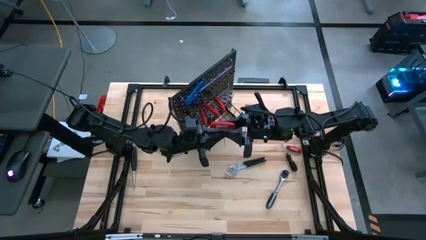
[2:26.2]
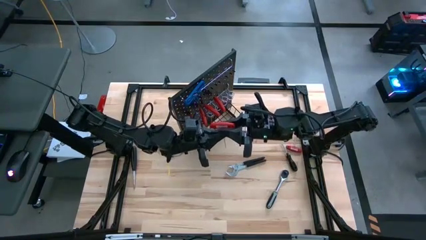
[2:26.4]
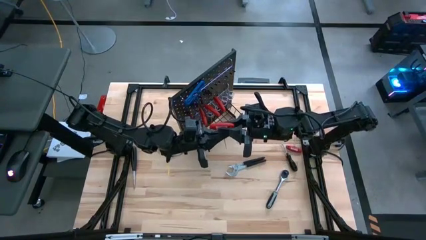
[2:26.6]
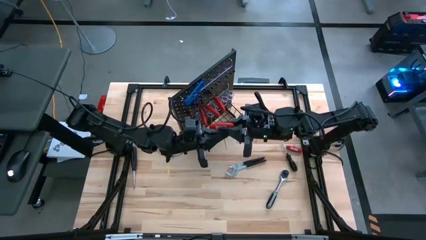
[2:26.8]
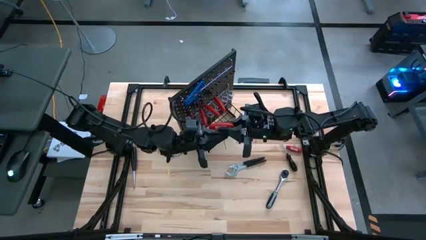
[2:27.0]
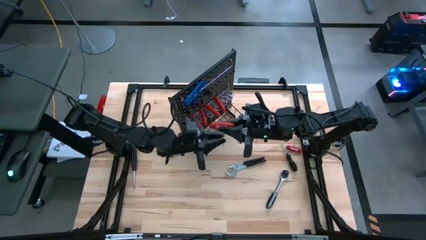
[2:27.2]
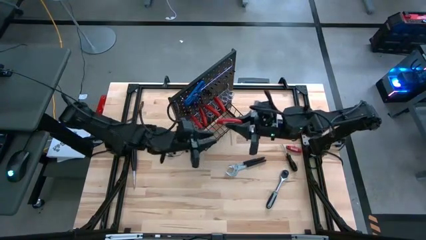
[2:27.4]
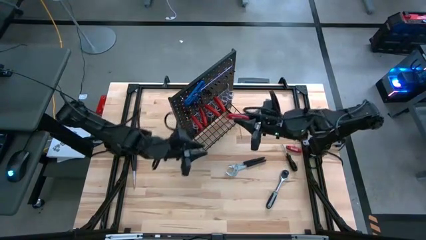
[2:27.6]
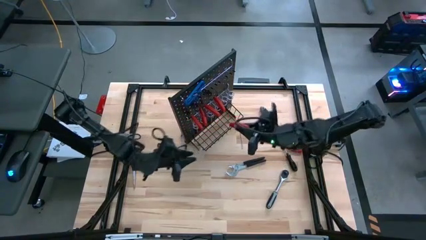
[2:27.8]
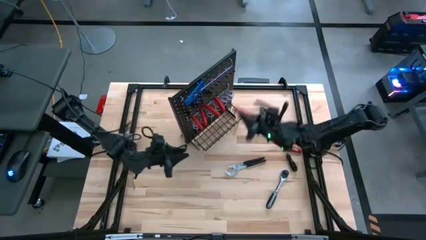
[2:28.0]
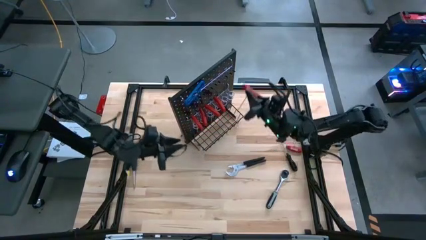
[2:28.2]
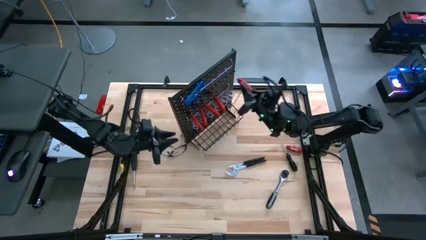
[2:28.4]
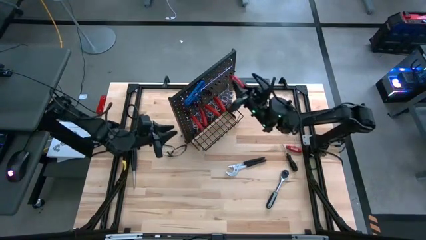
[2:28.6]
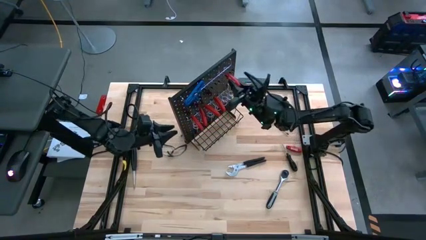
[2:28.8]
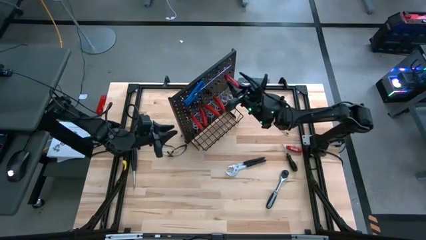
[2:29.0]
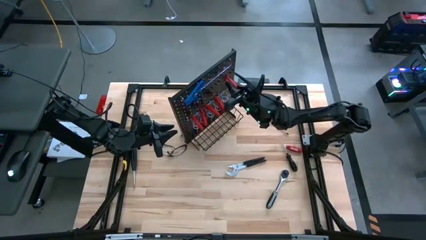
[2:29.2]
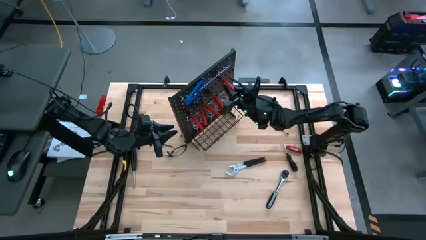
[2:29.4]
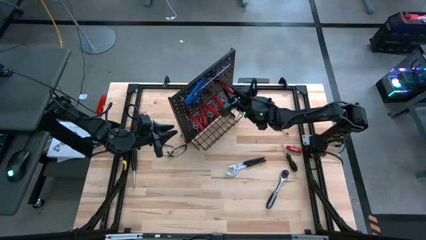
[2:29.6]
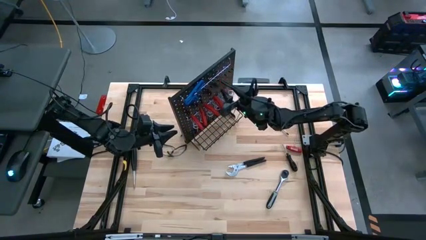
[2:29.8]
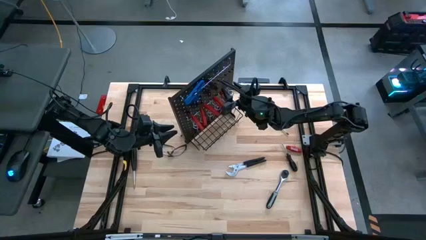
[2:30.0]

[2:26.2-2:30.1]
Task: Hang tools onto peg board
Hang the left red allen wrench on the pegboard

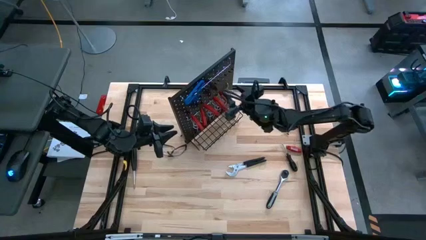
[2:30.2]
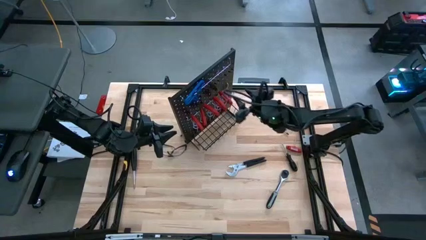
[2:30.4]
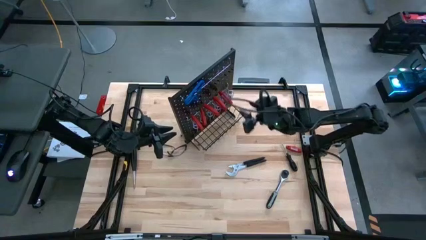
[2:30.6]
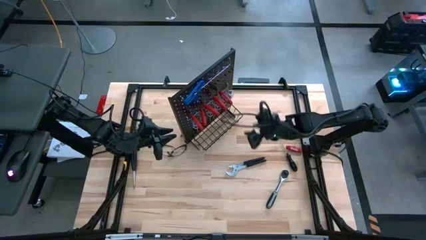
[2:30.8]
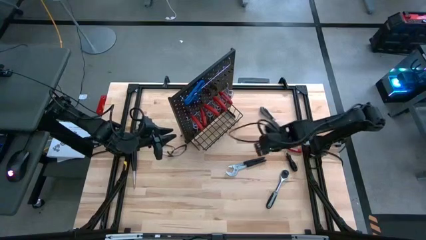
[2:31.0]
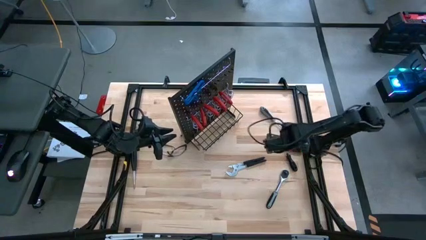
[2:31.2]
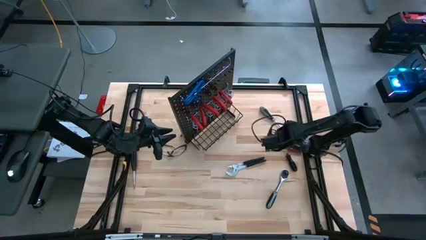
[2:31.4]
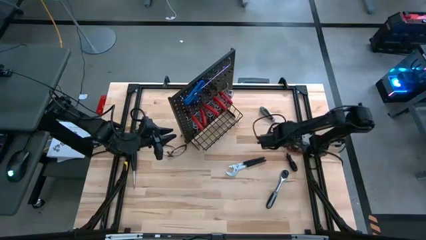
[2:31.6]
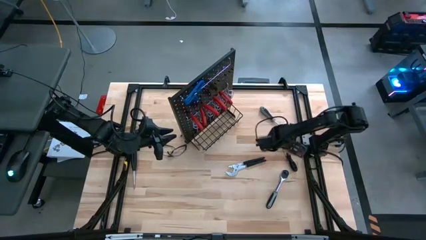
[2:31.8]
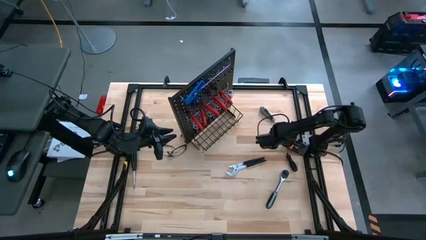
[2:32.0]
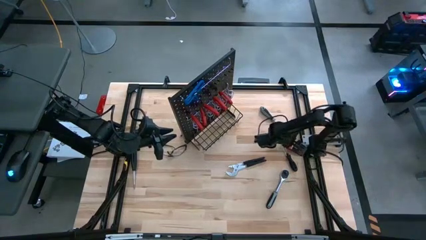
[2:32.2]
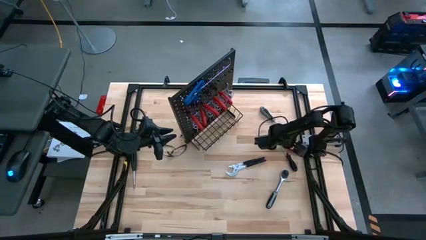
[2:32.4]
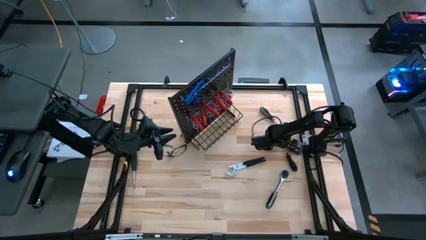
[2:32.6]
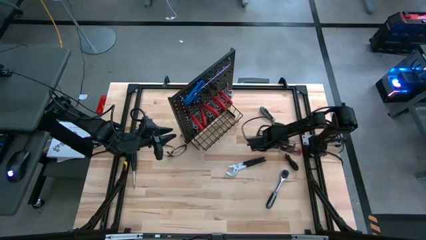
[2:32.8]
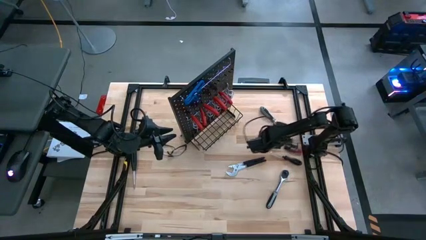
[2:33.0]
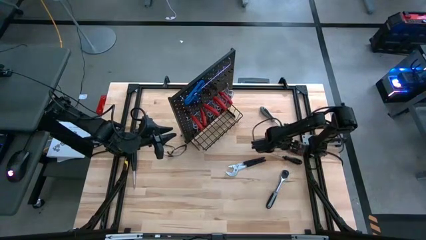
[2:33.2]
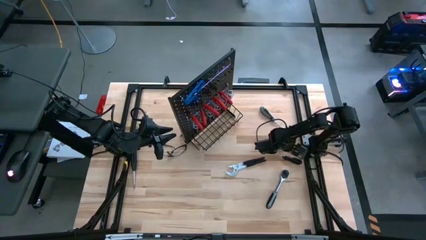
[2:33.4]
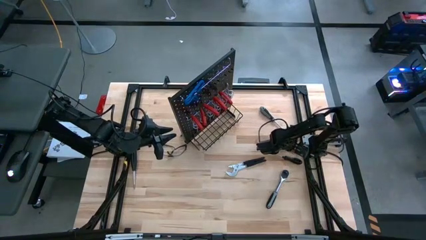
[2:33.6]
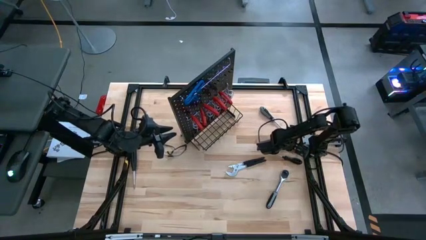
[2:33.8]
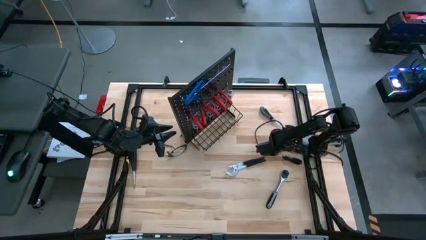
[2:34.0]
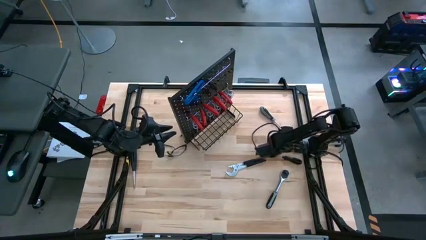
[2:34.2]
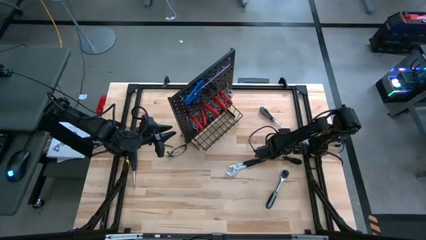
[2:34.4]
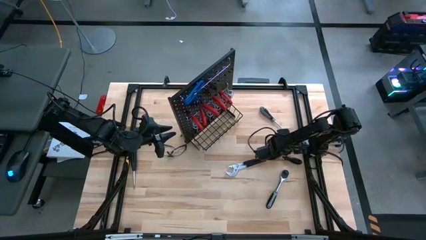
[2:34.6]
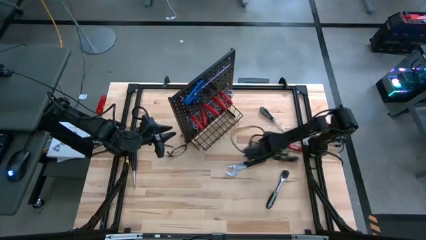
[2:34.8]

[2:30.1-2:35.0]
Adjust the black screwdriver

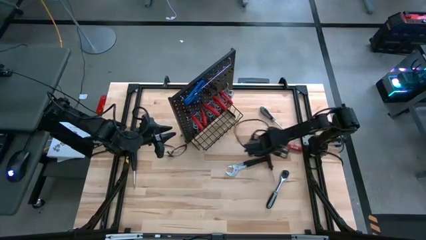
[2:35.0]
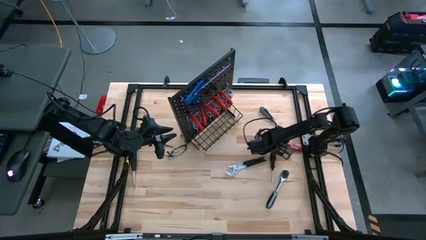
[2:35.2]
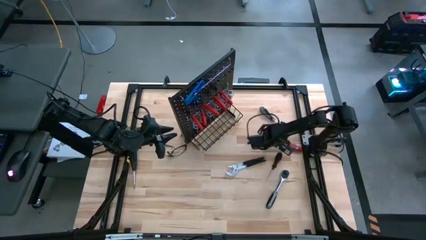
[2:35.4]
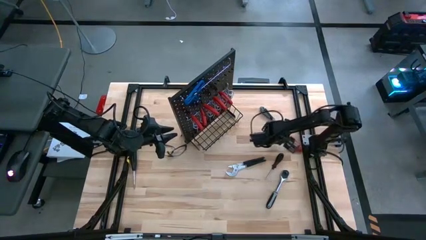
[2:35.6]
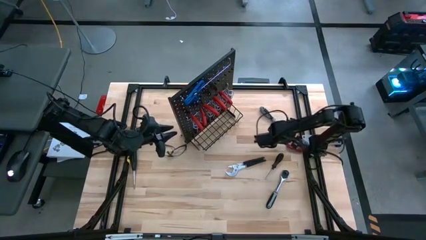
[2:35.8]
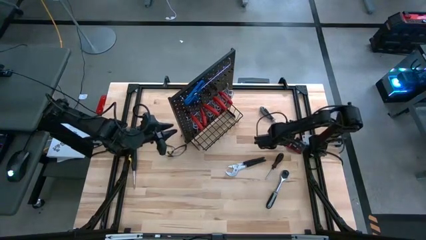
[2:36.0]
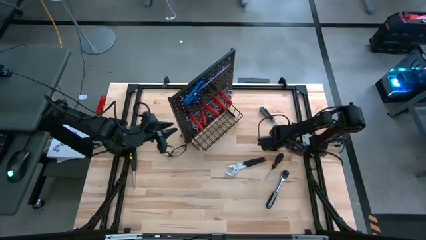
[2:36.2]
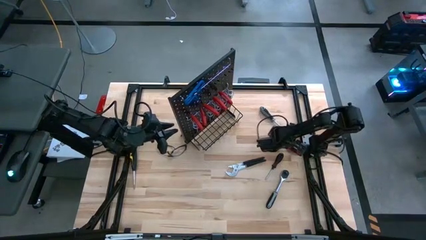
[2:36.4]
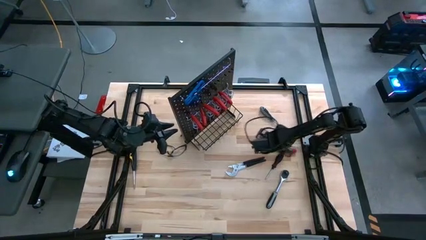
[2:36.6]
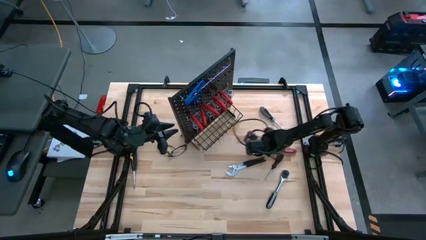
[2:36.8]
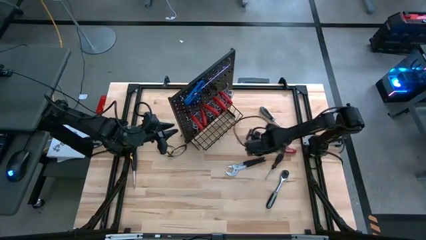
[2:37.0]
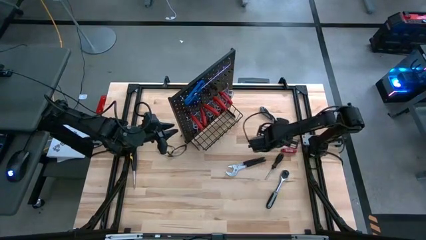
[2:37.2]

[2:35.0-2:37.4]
Hang the red allen wrench on the peg board

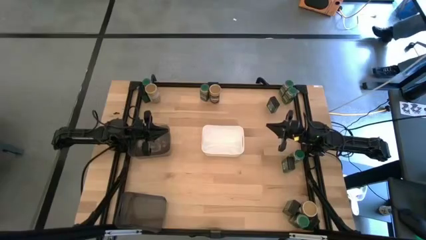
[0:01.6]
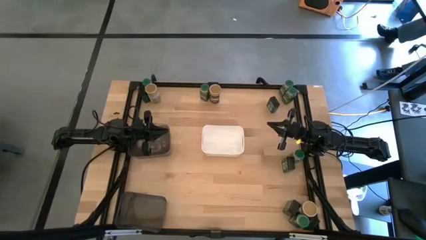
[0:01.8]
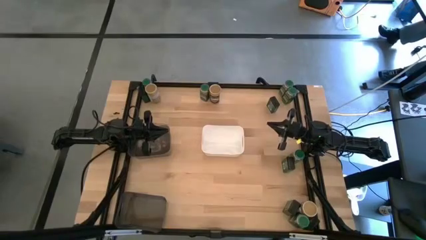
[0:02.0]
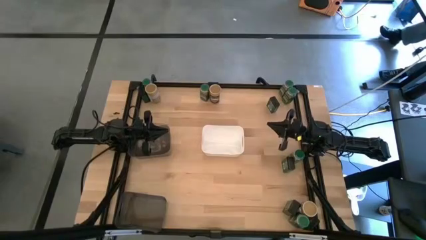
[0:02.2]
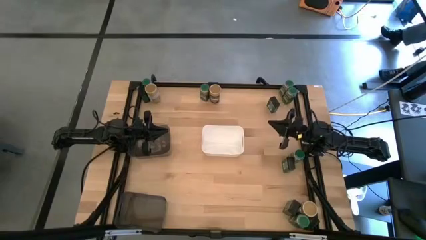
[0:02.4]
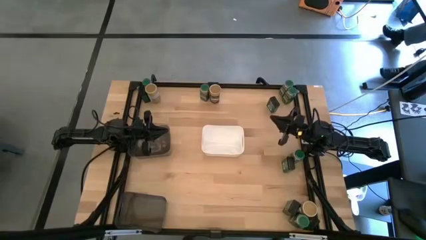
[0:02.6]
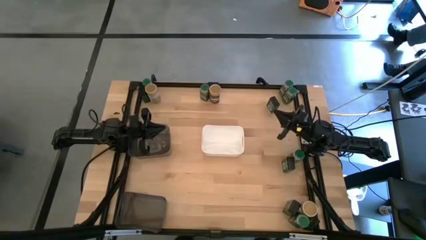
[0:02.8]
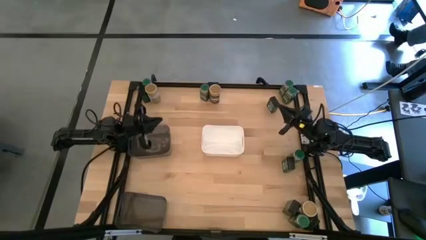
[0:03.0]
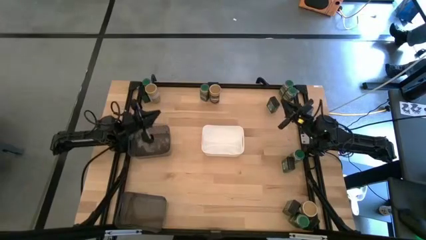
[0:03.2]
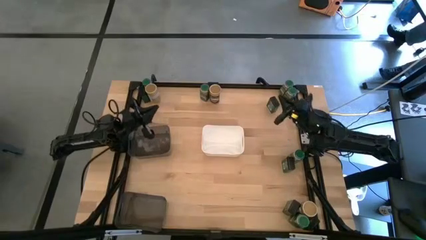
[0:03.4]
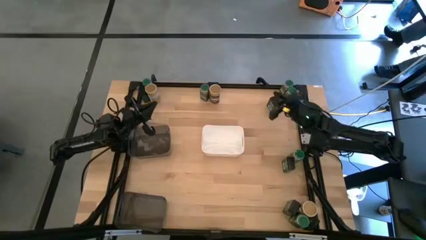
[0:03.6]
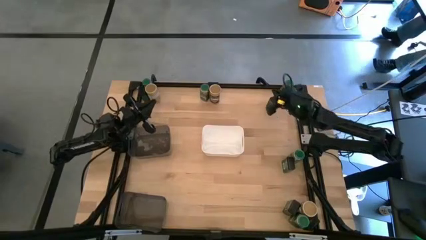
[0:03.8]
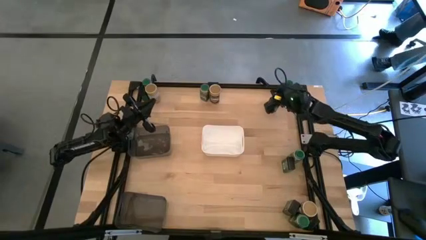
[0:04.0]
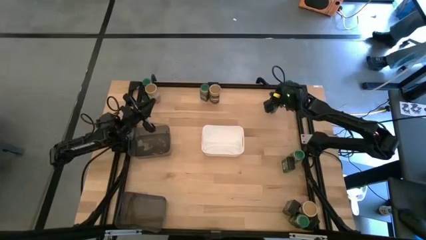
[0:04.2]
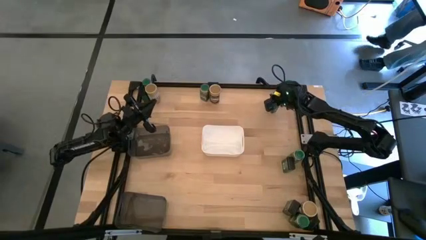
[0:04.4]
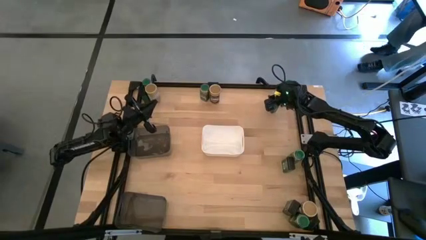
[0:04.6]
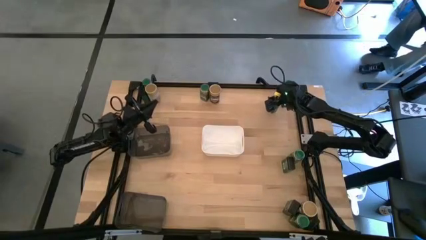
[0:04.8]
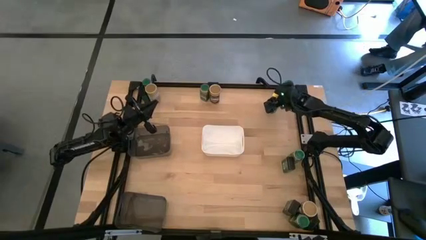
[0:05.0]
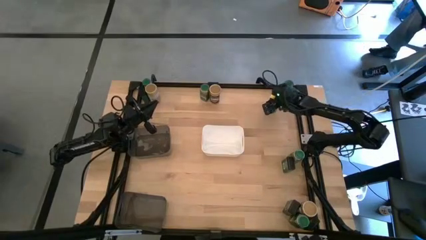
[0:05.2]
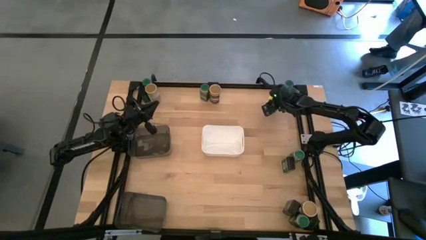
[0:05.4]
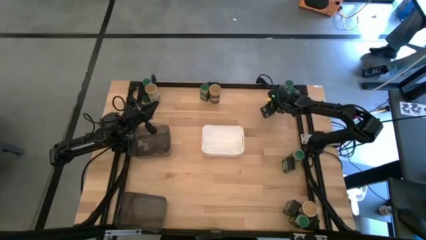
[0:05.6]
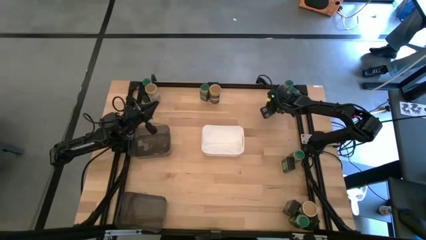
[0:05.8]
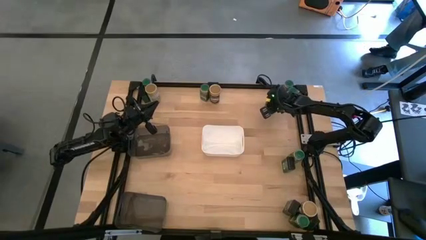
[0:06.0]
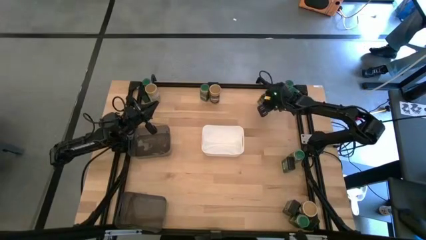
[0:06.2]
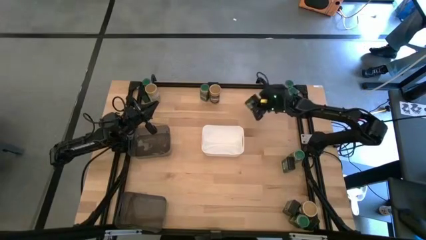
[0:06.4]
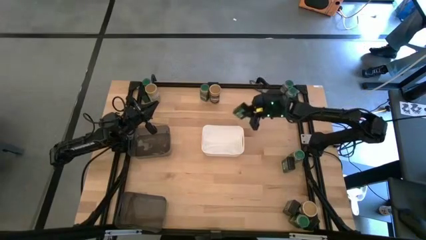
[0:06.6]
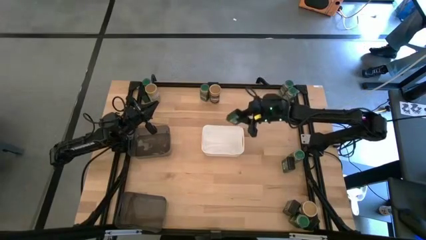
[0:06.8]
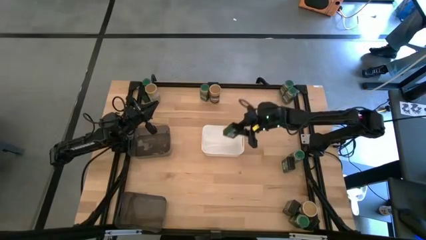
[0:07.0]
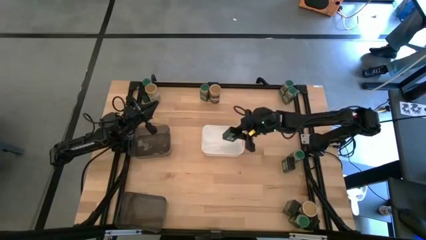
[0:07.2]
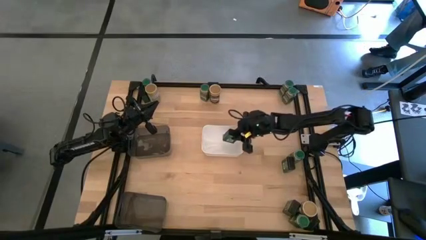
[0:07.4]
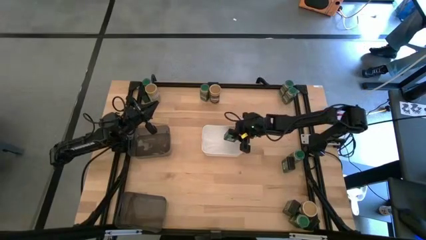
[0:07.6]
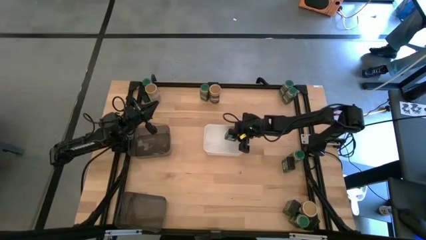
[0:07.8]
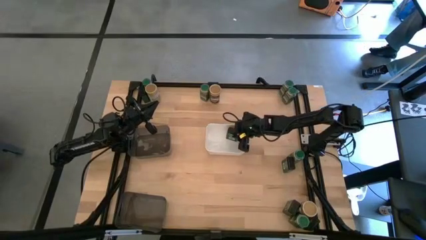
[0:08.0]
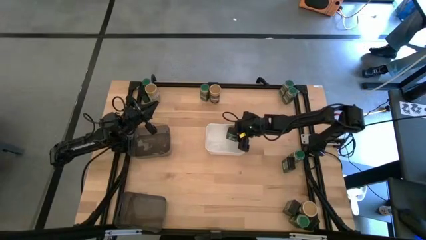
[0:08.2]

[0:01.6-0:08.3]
Task: Sort spices by type
Put the black seasoning can into the white bin
